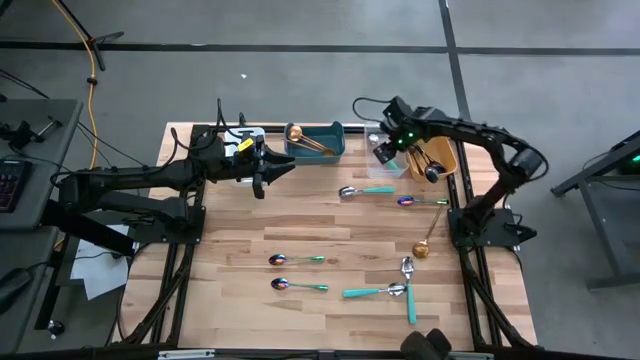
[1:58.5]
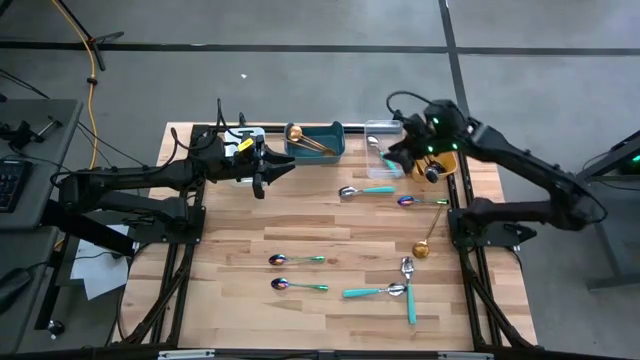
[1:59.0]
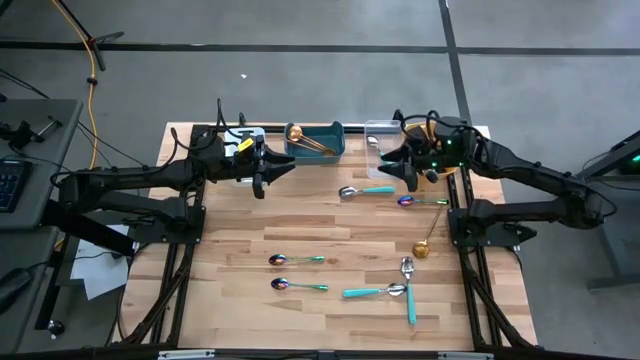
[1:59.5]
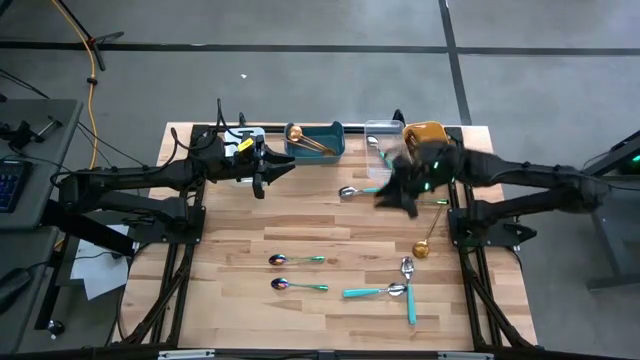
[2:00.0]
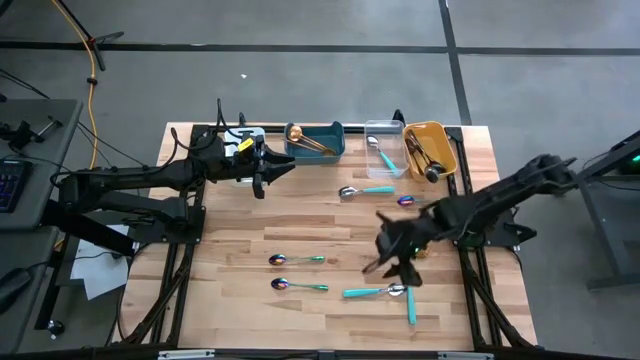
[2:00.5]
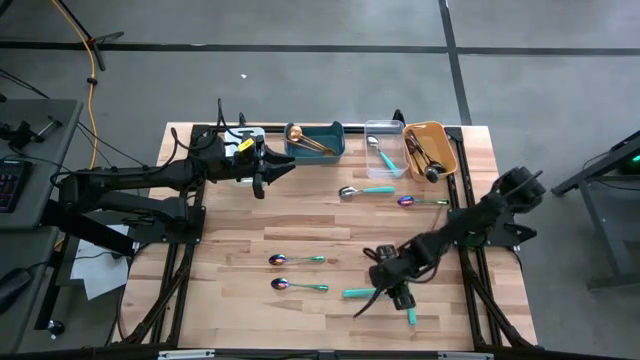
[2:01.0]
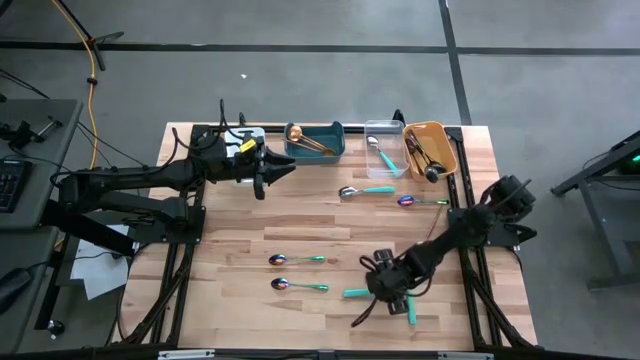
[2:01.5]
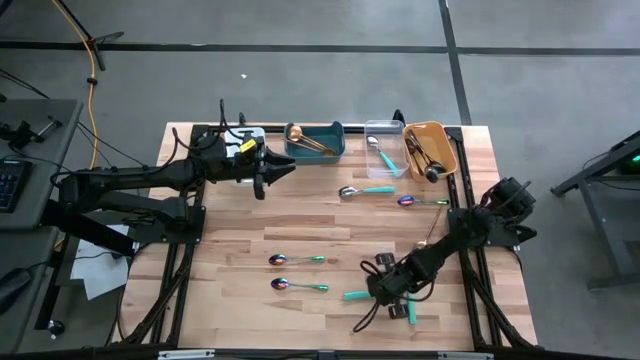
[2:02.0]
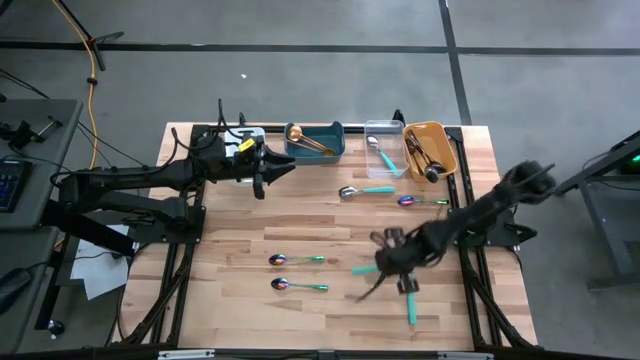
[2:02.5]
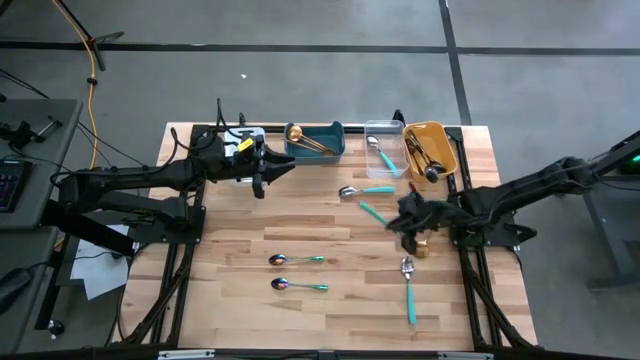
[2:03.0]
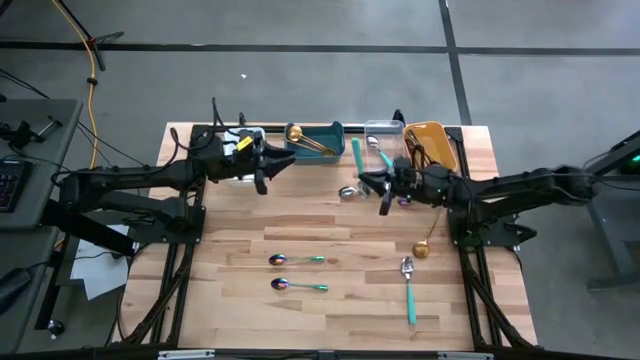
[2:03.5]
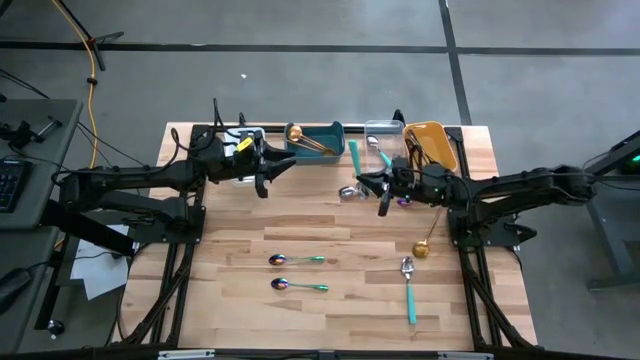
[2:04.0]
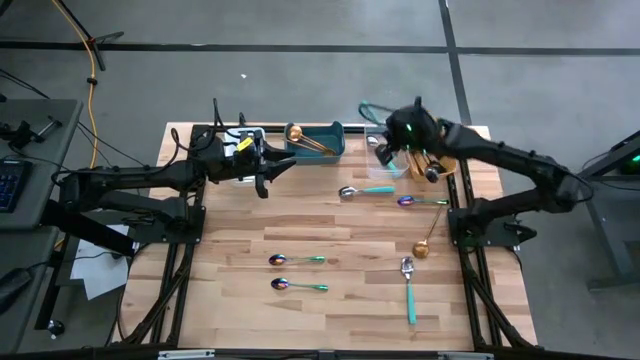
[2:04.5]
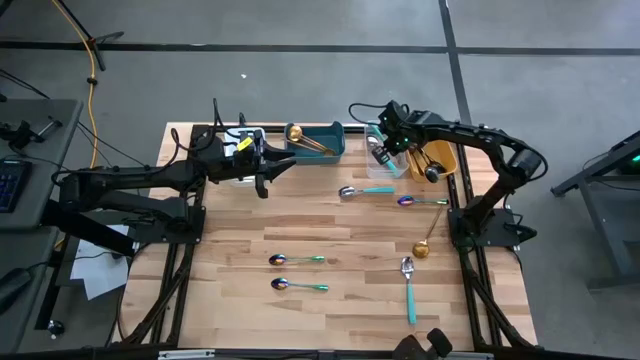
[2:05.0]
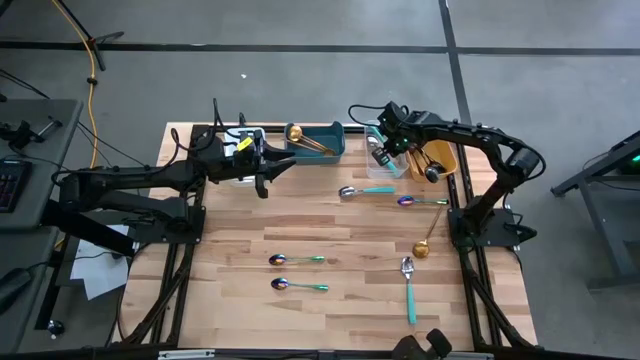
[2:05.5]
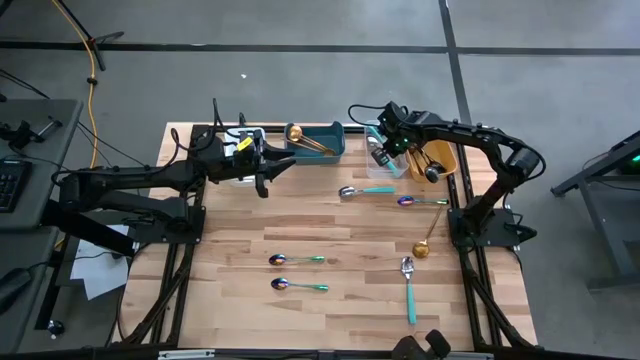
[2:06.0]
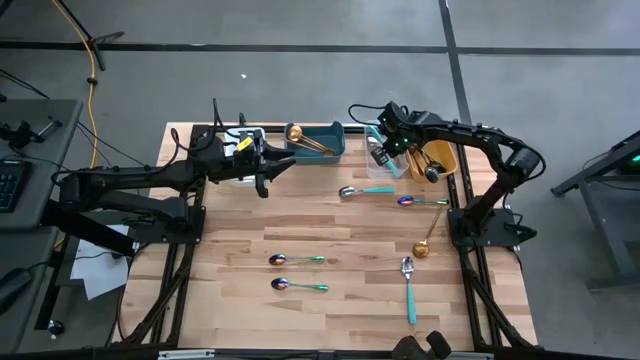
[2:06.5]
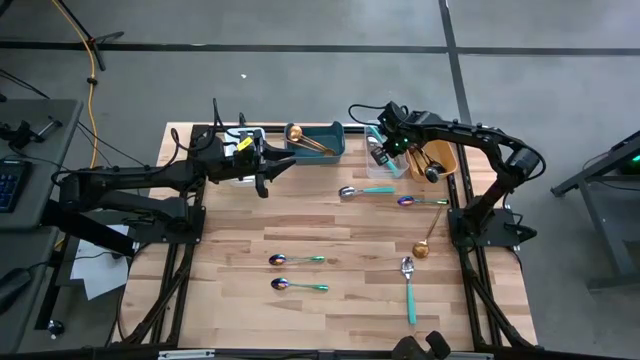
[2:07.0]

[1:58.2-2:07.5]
Task: Sort silverware by color (type)
Put the light blue spoon into the transparent bin

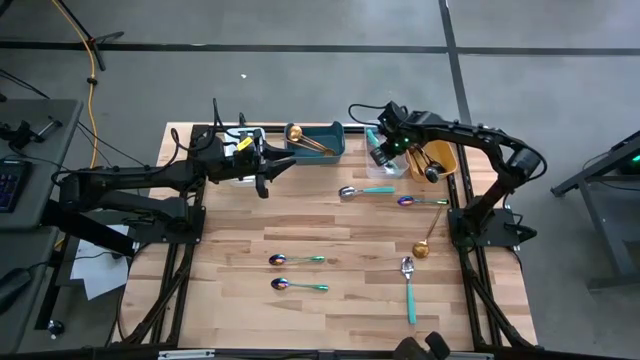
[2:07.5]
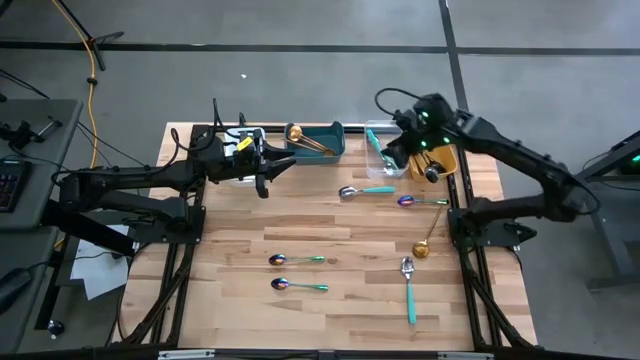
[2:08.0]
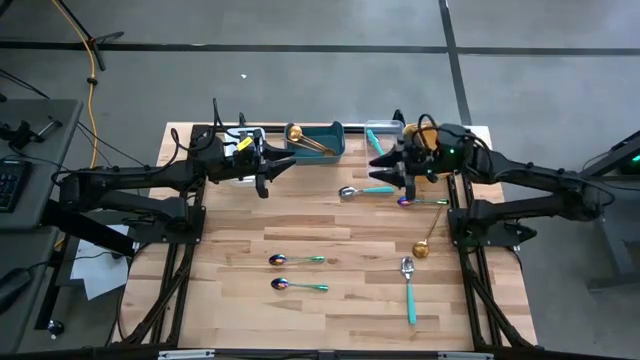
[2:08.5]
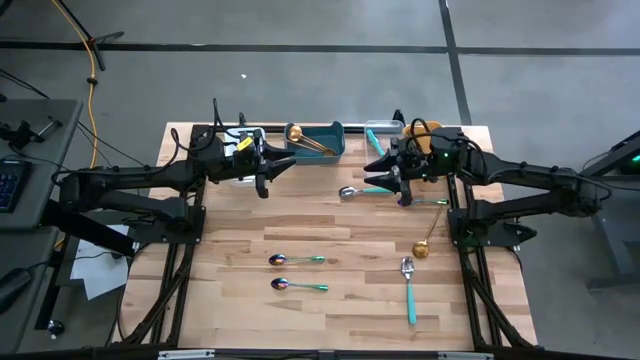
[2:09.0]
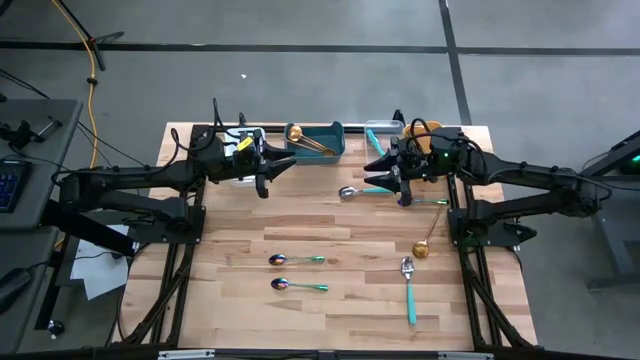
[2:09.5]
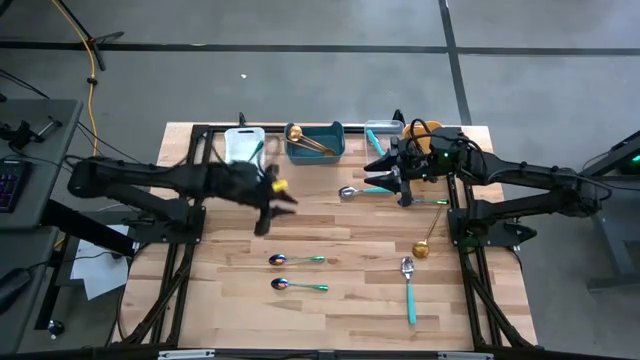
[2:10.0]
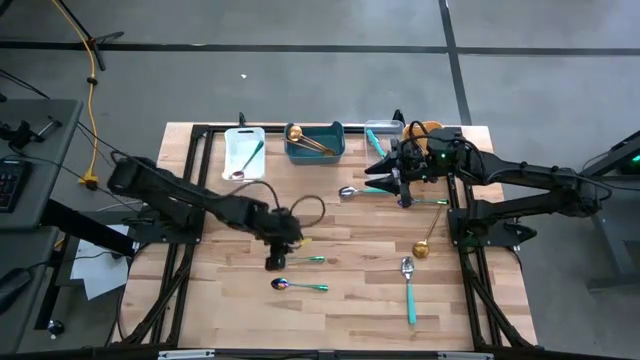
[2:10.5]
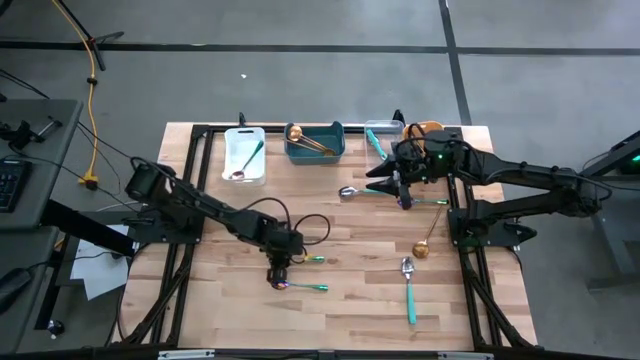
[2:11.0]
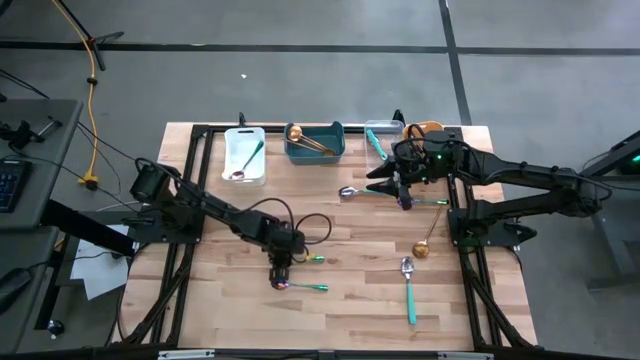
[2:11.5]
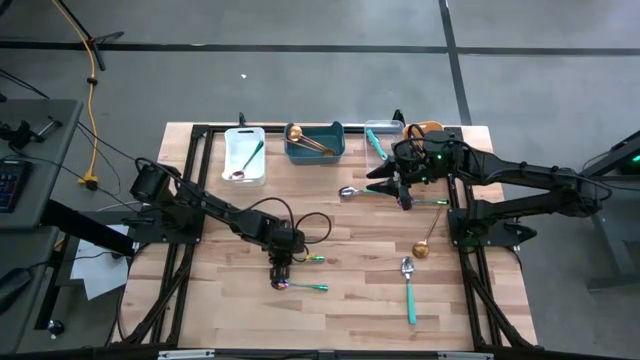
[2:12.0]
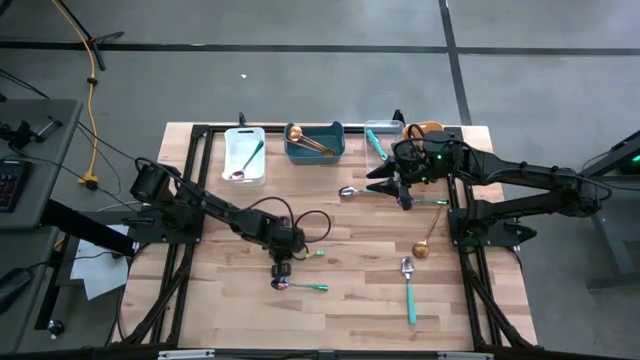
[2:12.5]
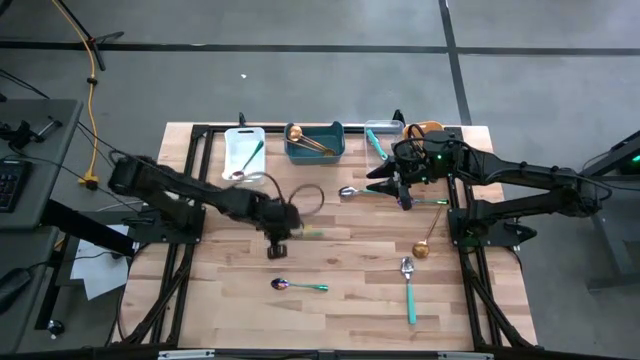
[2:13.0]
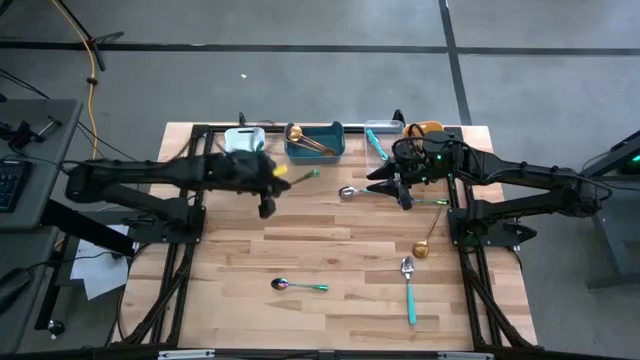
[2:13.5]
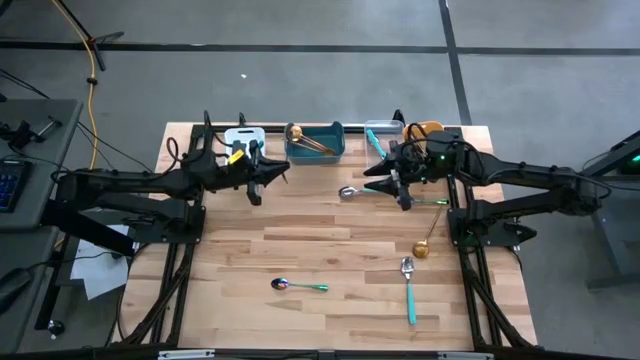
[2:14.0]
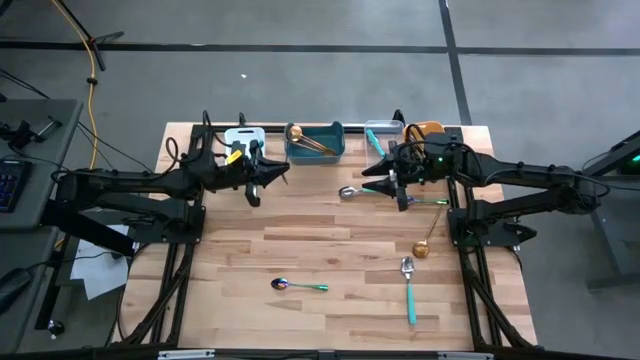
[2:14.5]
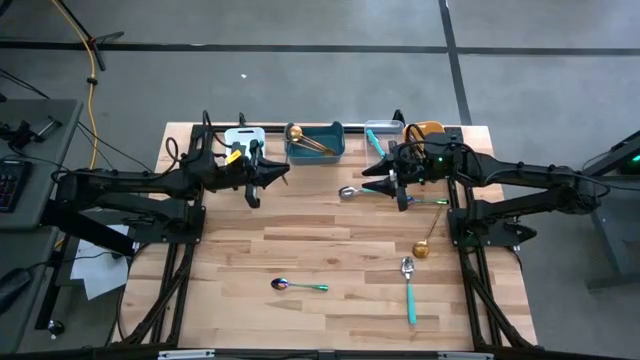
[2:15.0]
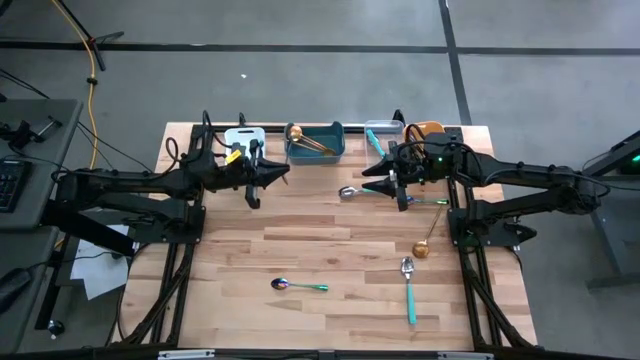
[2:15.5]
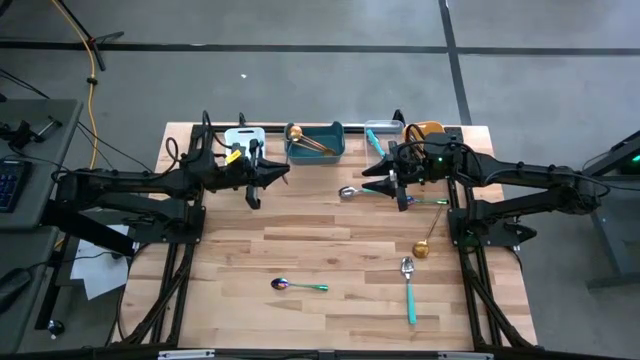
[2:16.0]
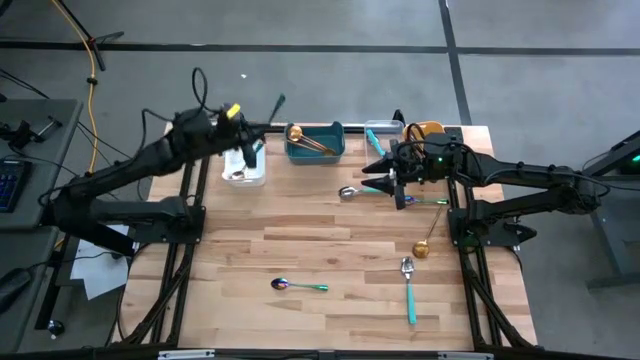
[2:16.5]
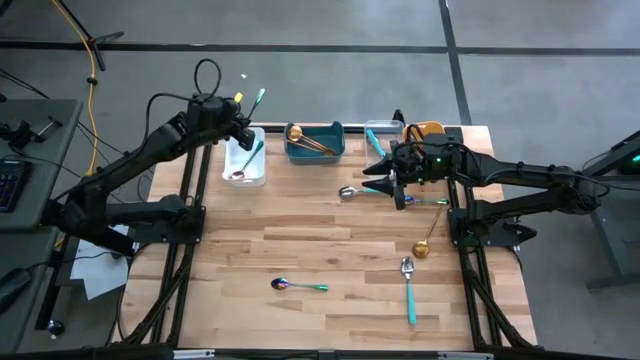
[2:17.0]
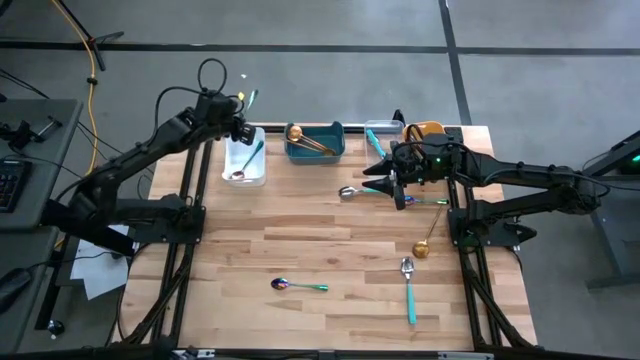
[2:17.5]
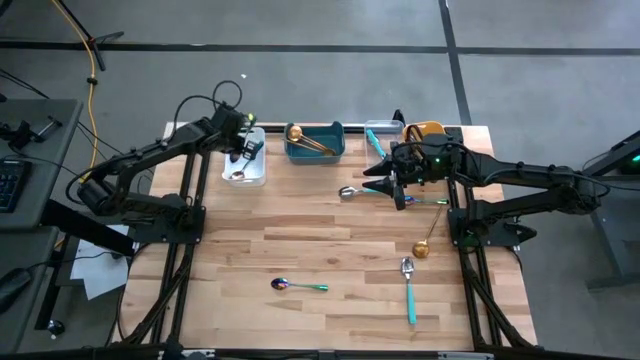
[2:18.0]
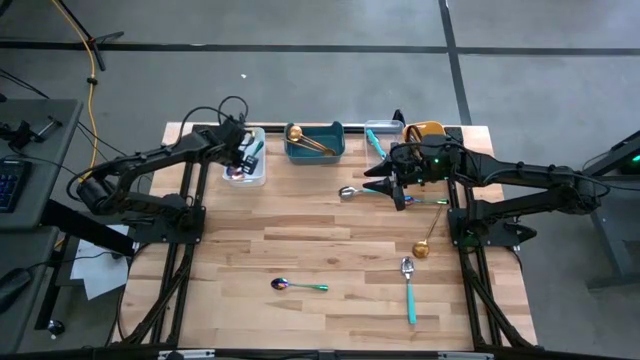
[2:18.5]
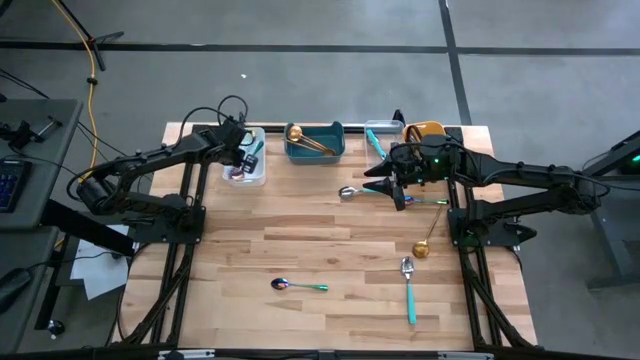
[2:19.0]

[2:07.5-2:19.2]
Put the green spoon into the white bin

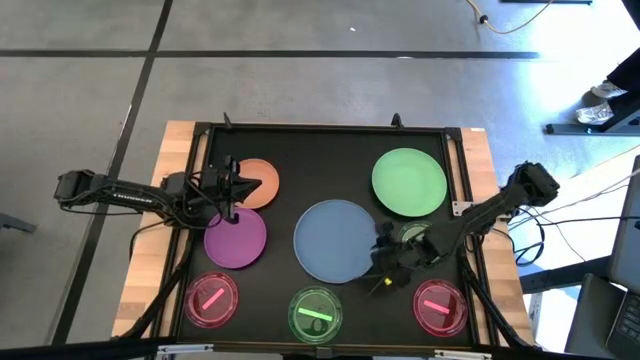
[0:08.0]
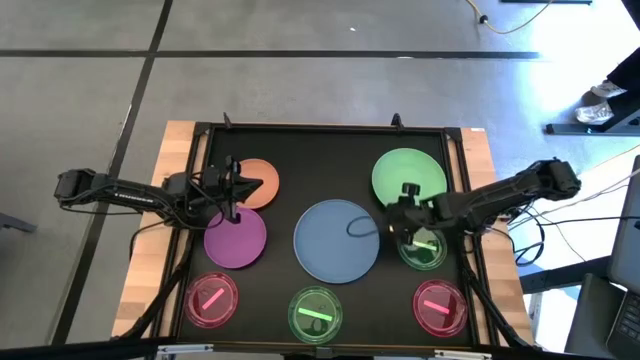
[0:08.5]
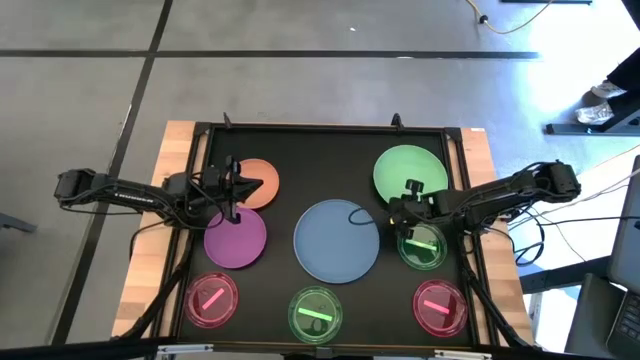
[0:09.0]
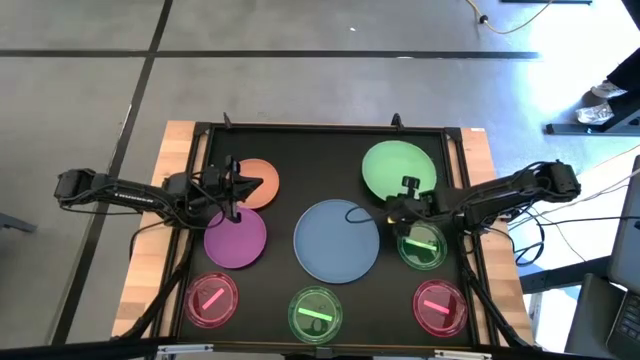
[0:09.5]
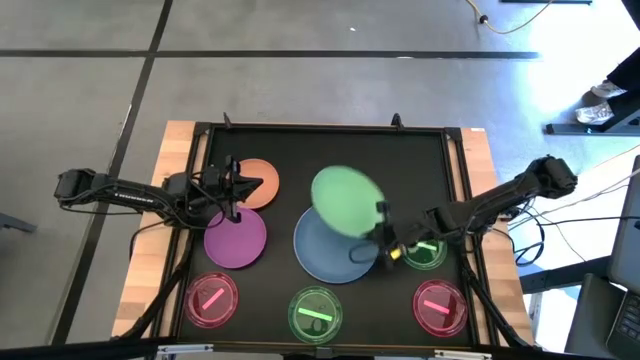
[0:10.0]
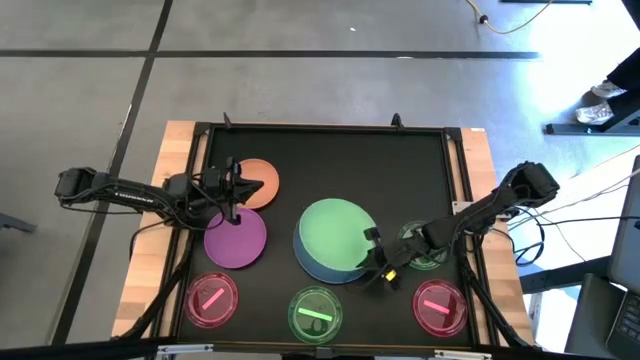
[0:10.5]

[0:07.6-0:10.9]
Task: Stack plastic plates
Stack the light green plate on top of the blue plate
